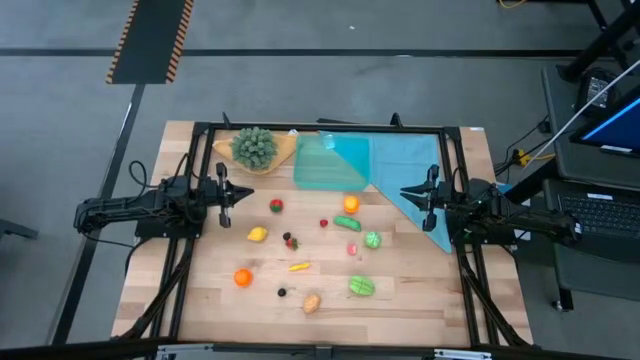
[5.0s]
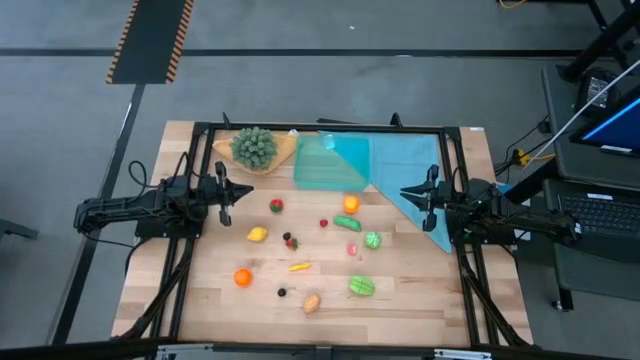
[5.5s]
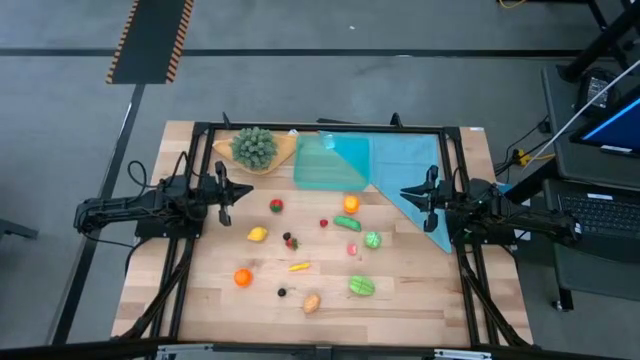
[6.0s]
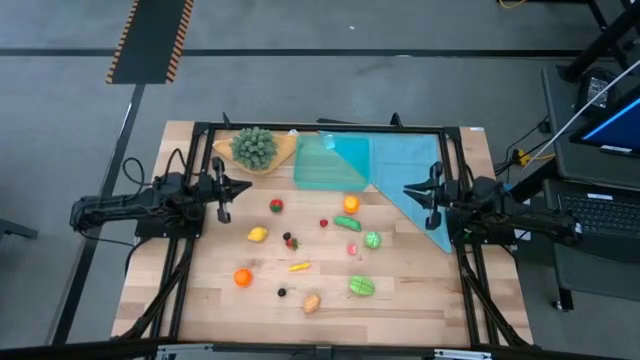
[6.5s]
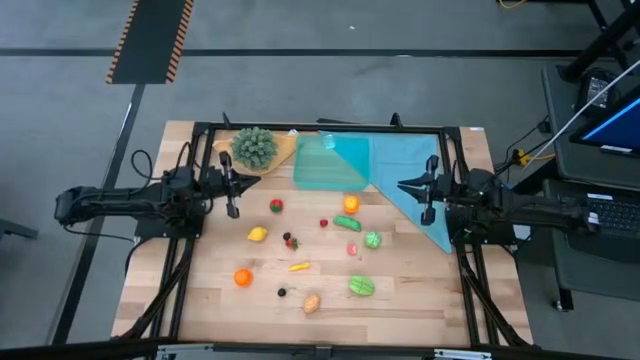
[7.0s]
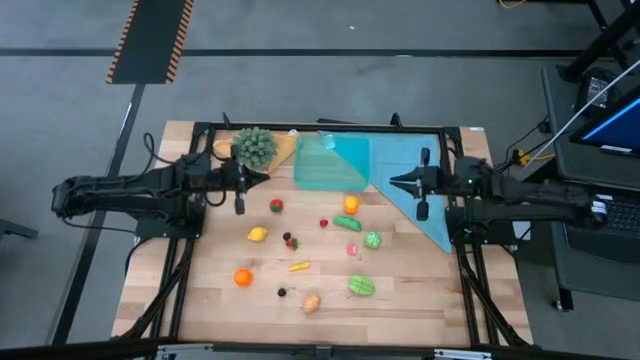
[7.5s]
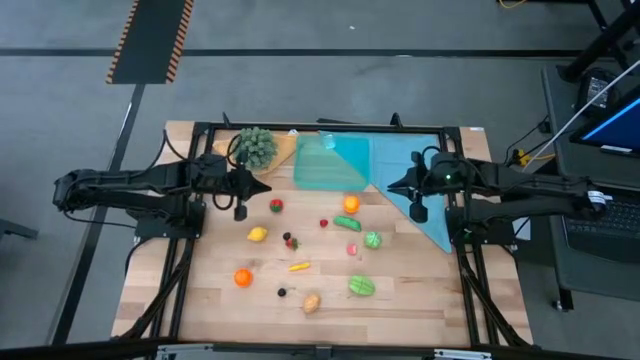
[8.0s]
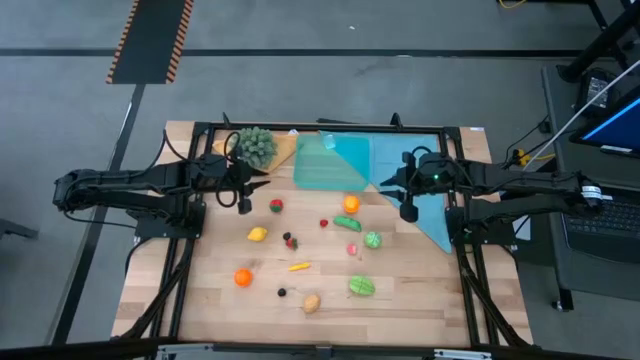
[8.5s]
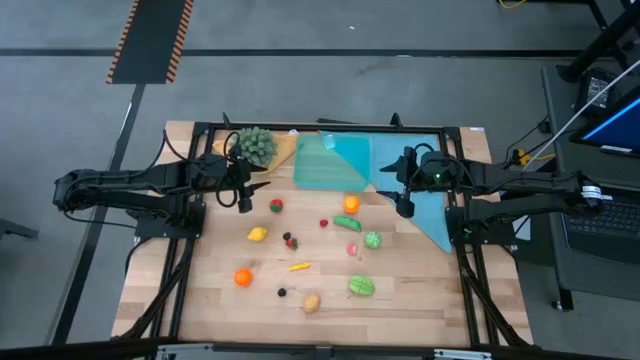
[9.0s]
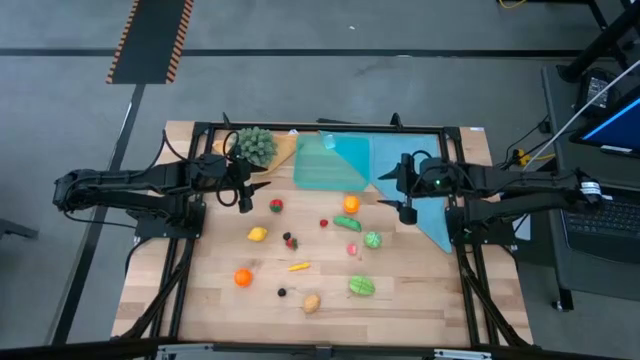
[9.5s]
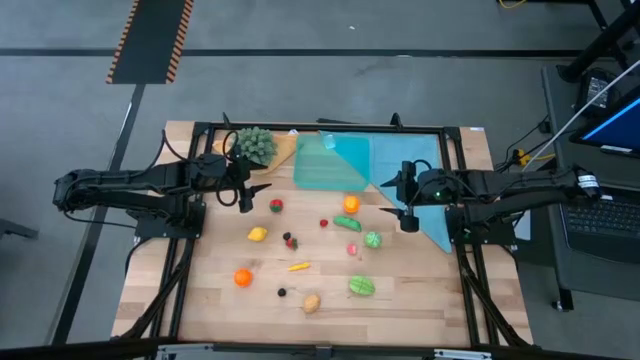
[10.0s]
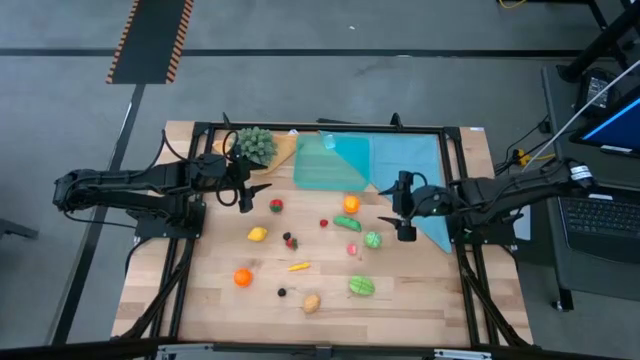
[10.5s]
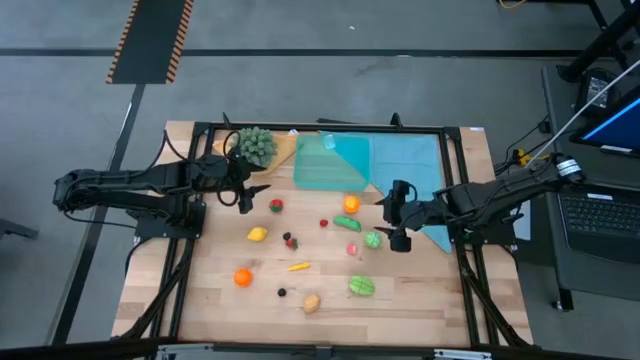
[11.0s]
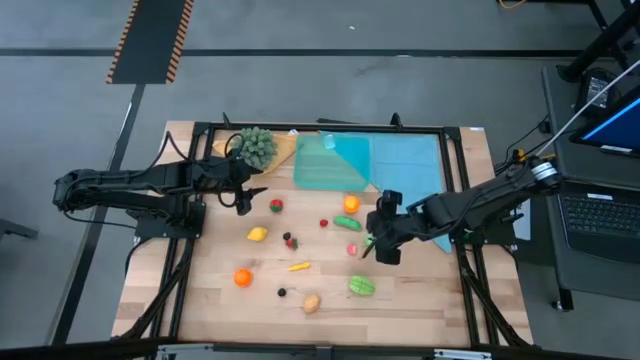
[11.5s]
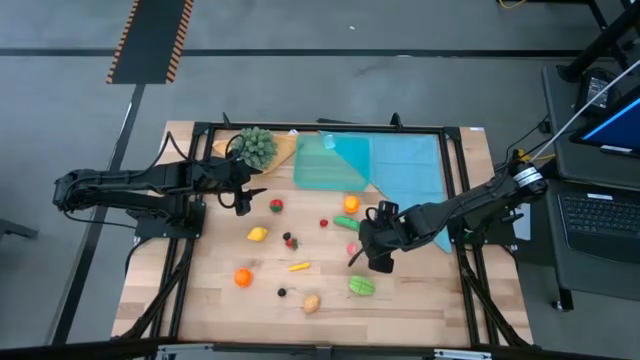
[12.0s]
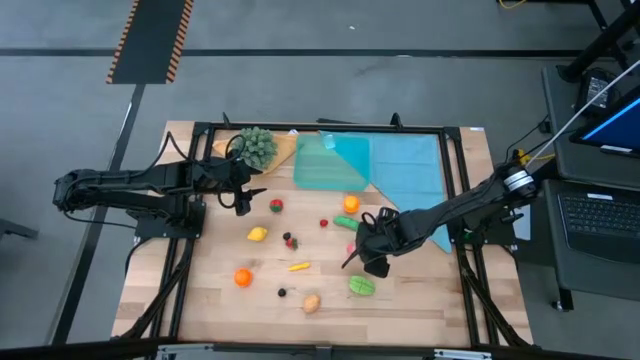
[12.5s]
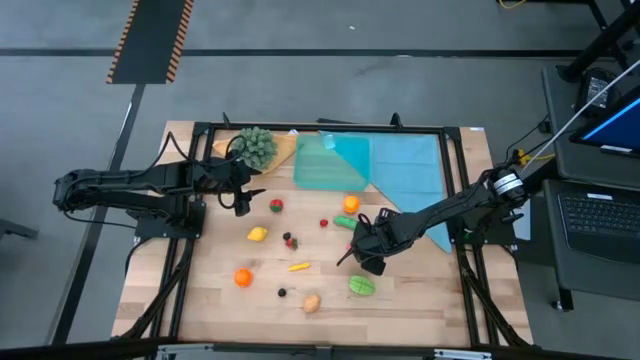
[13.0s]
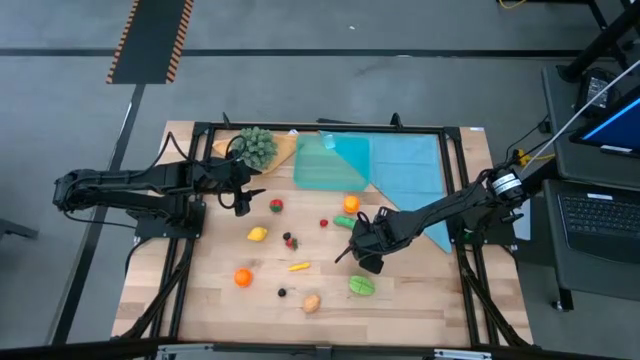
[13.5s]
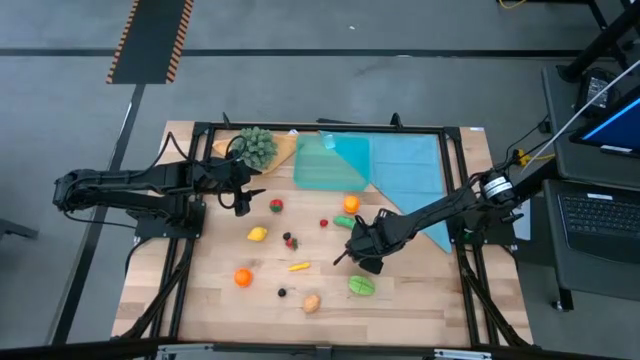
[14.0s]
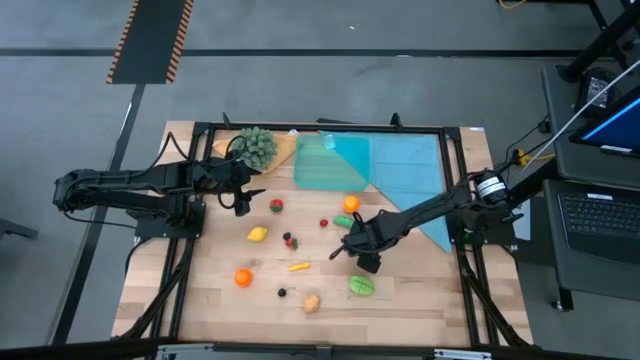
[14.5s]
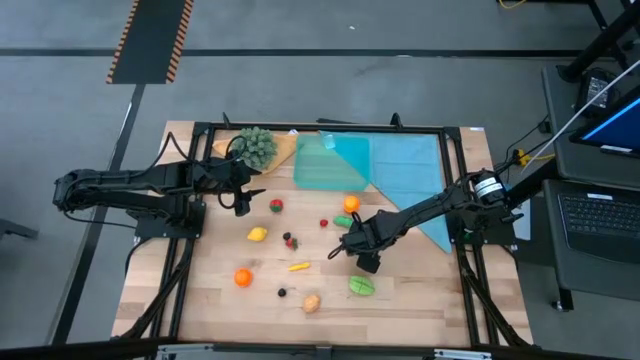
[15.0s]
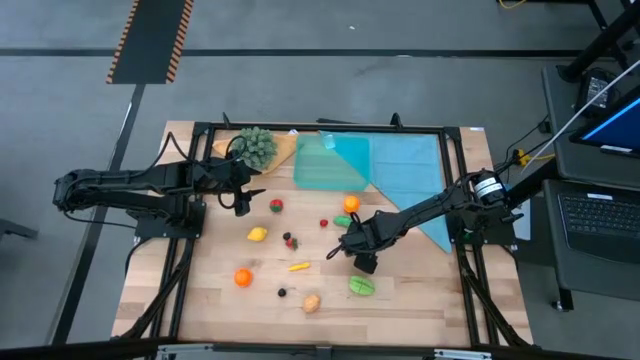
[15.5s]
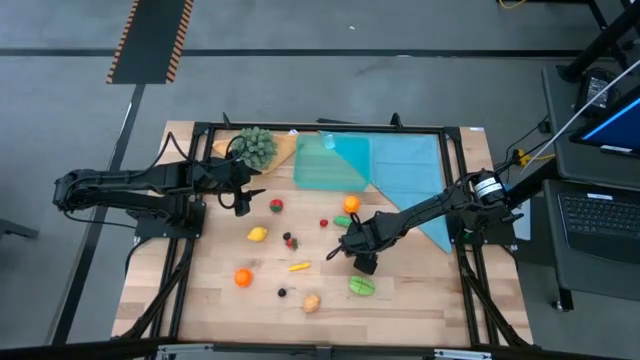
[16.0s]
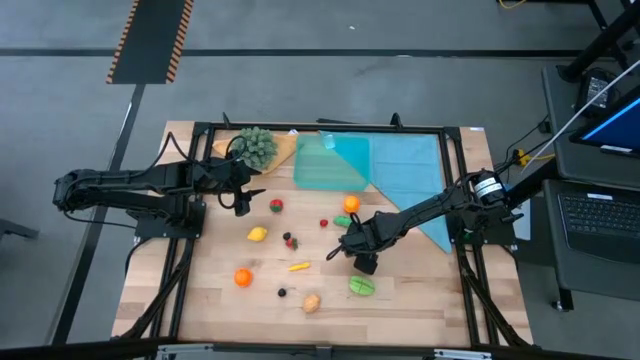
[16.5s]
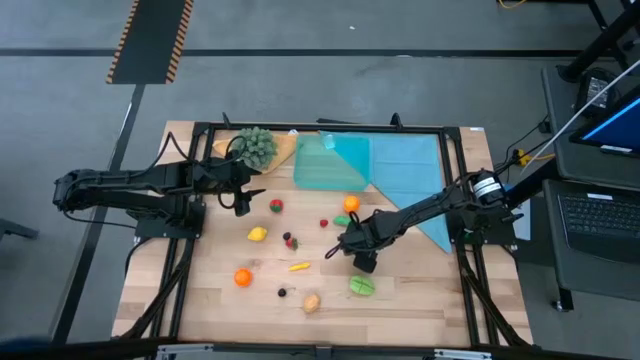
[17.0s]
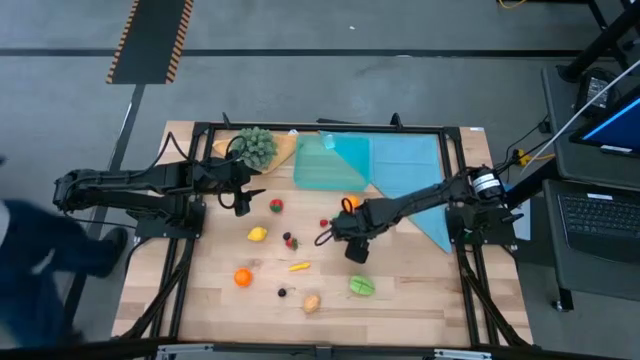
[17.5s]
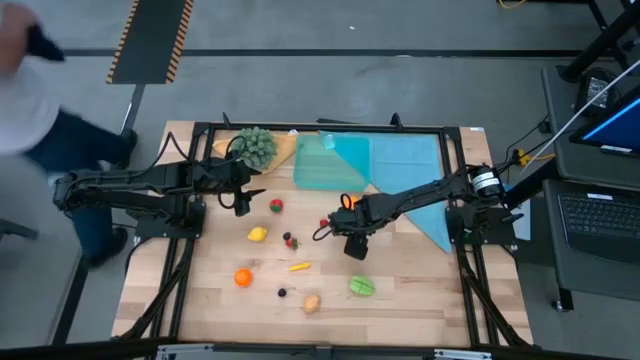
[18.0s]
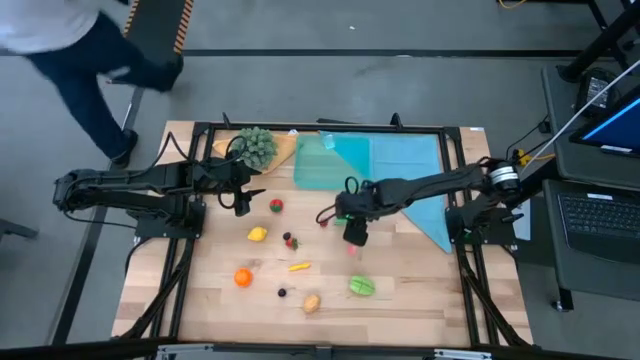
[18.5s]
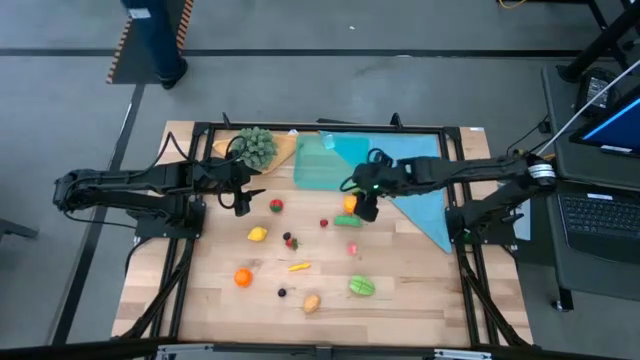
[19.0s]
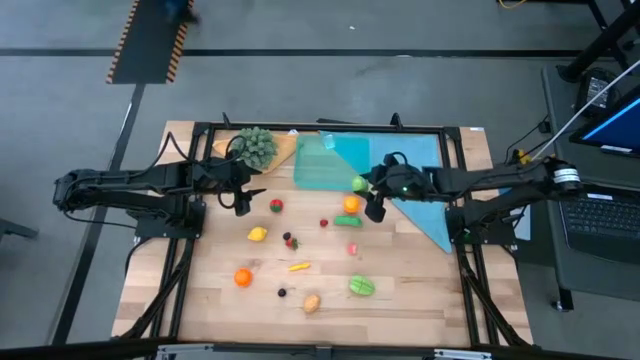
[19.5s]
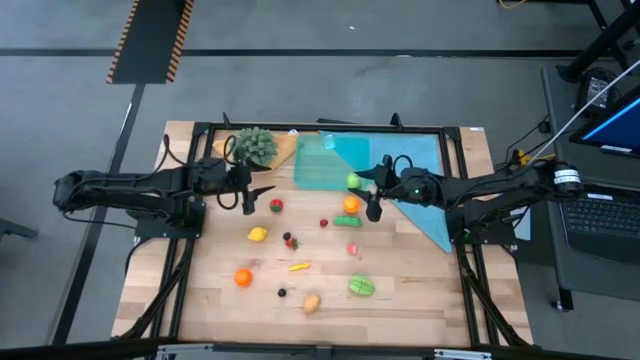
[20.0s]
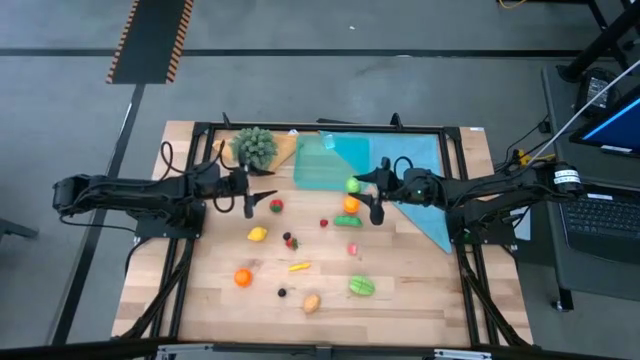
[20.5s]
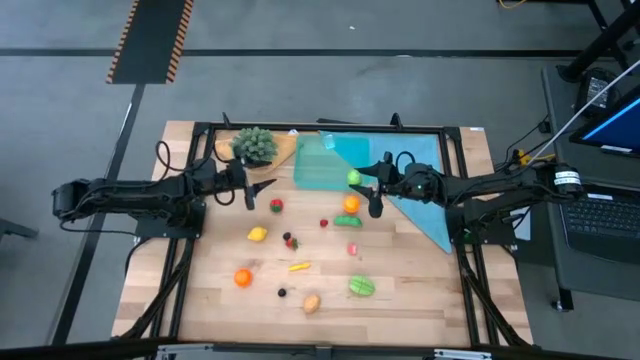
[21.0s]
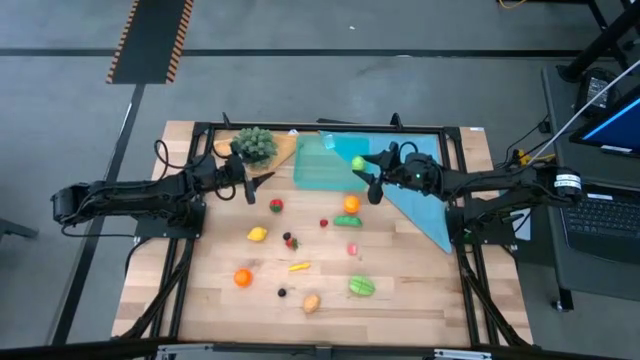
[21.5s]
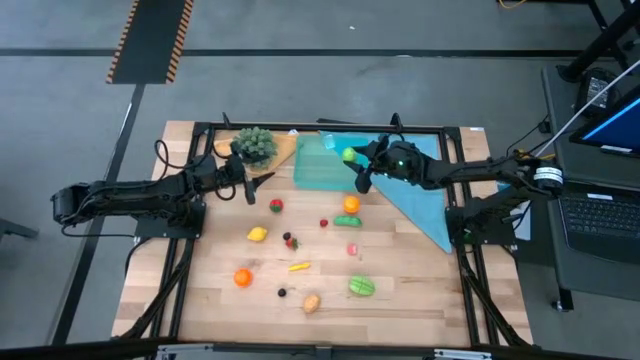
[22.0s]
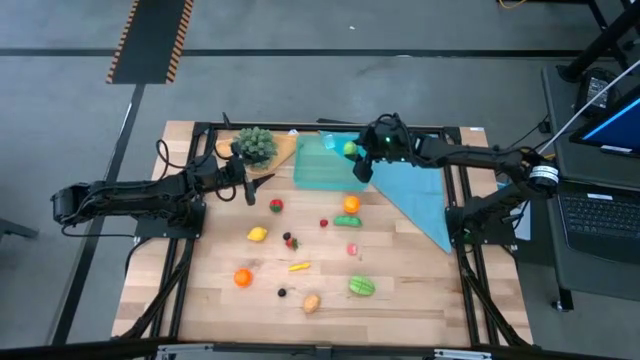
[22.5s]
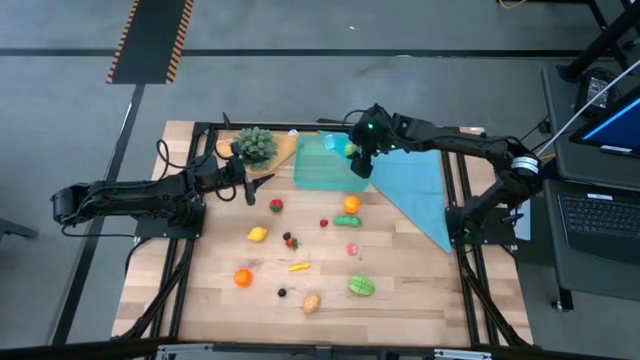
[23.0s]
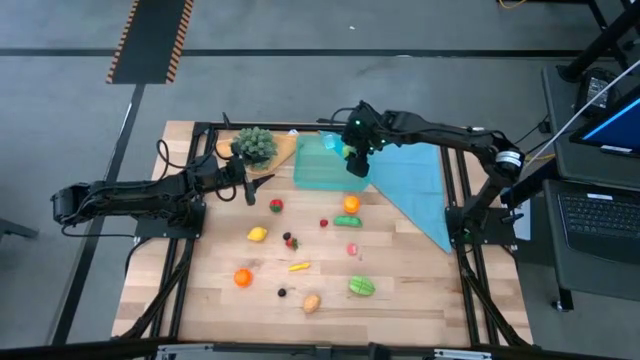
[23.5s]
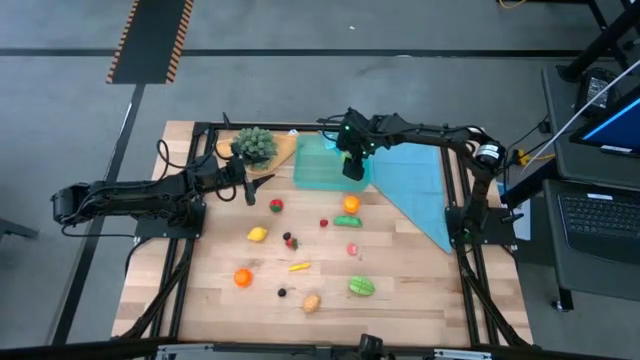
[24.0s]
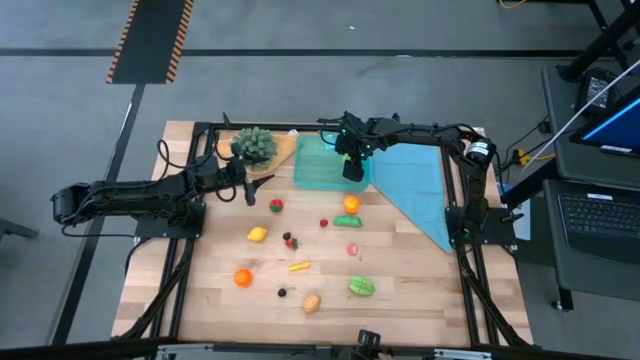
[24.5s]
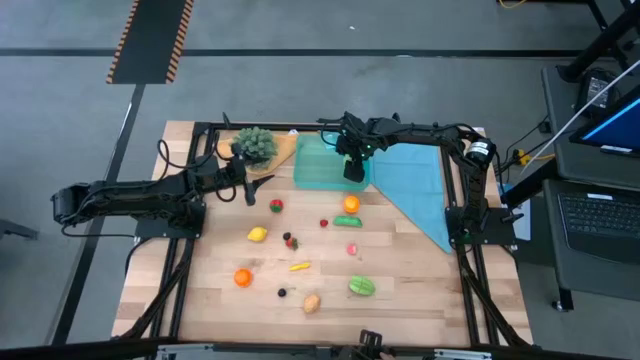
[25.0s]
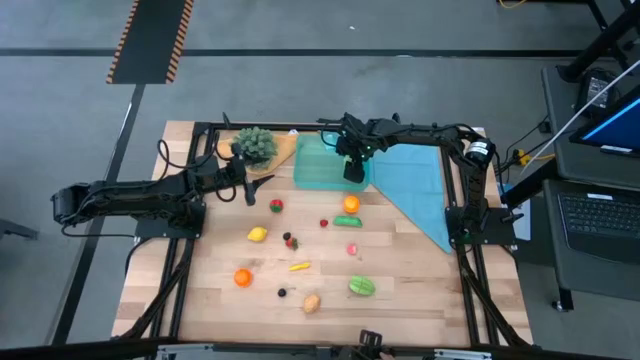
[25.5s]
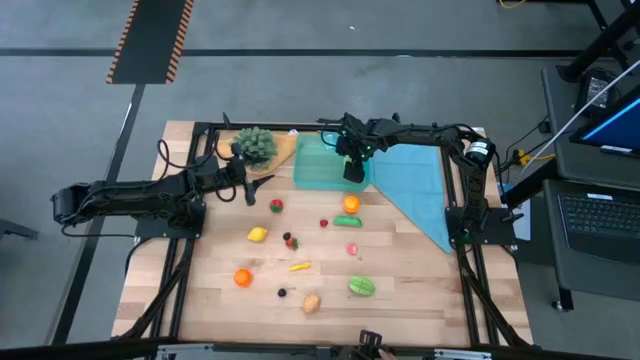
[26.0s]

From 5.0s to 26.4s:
Task: Pick and placing Produce into tupperware
Put the lettuce into the blue bin
